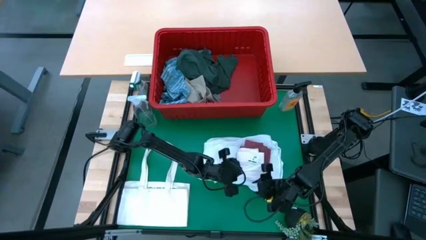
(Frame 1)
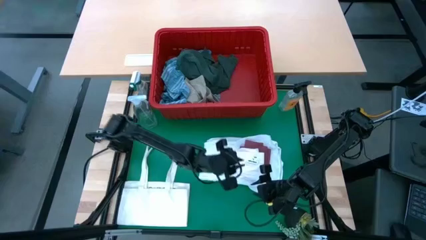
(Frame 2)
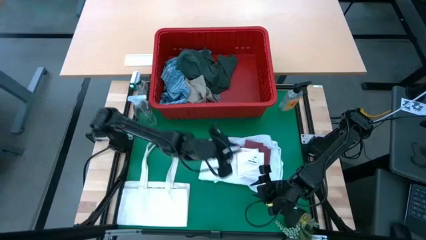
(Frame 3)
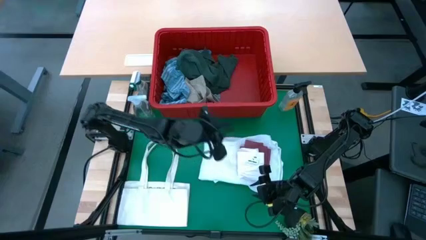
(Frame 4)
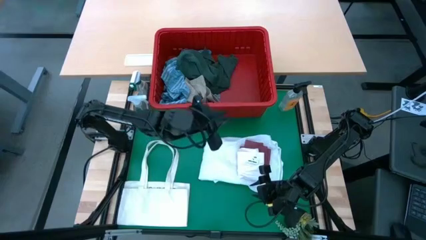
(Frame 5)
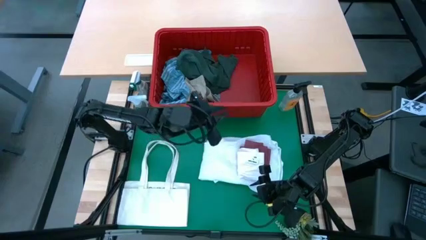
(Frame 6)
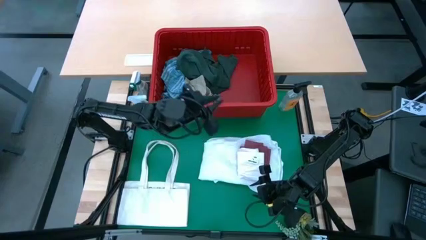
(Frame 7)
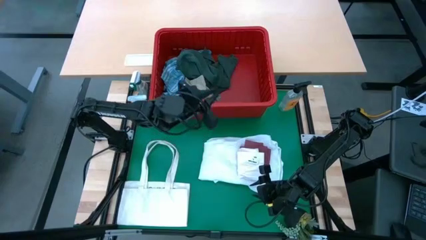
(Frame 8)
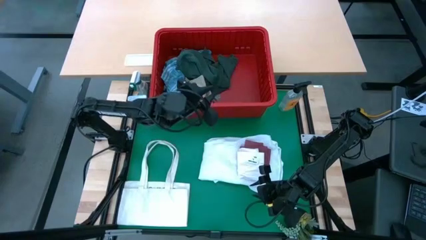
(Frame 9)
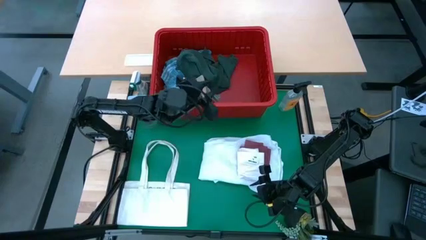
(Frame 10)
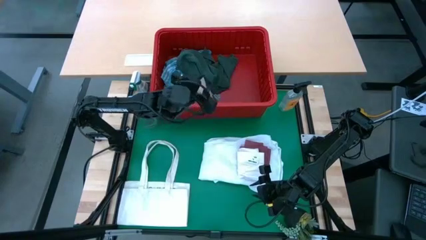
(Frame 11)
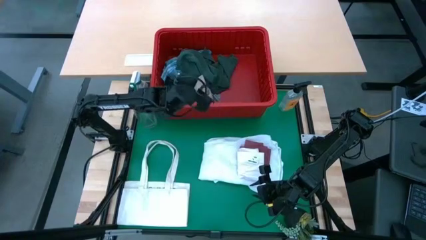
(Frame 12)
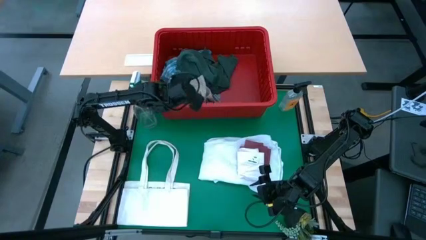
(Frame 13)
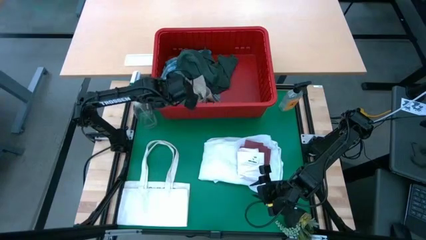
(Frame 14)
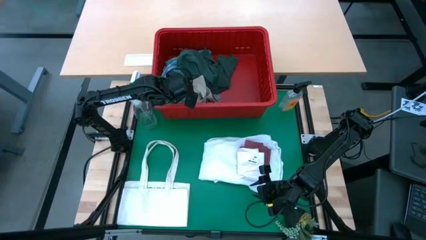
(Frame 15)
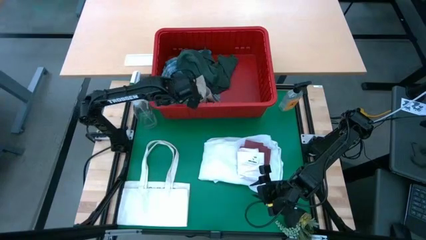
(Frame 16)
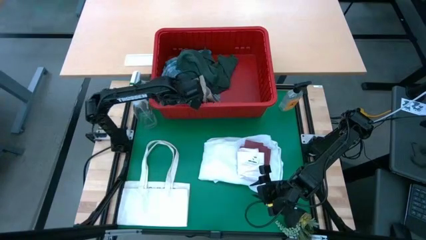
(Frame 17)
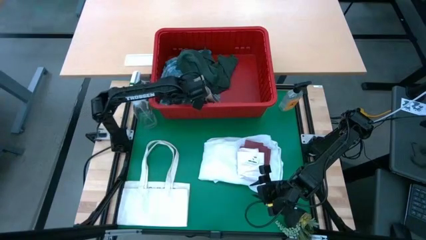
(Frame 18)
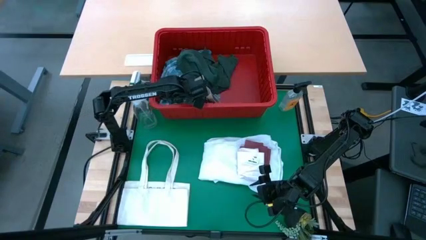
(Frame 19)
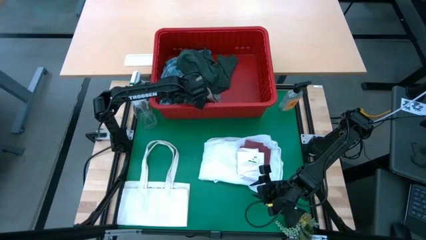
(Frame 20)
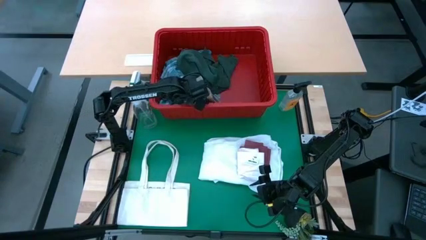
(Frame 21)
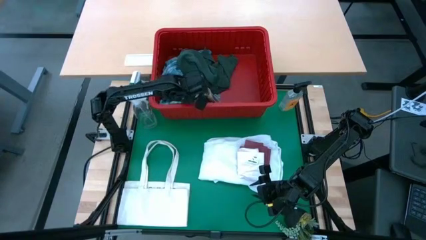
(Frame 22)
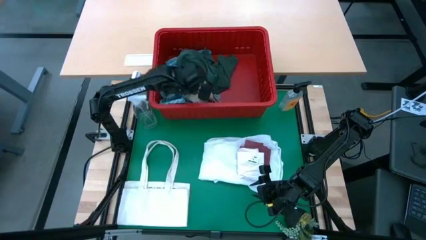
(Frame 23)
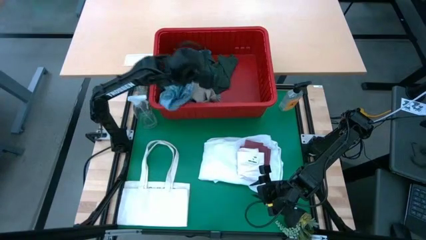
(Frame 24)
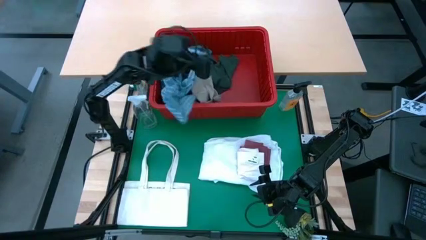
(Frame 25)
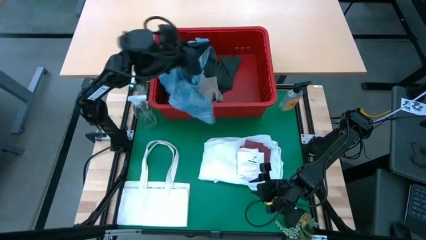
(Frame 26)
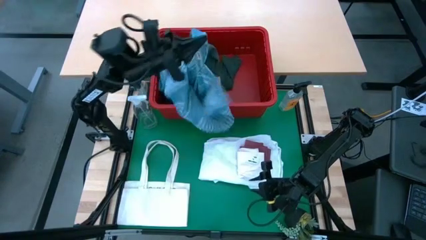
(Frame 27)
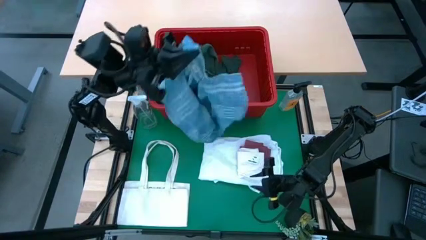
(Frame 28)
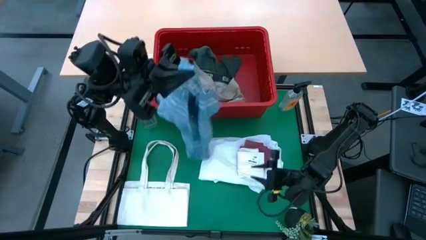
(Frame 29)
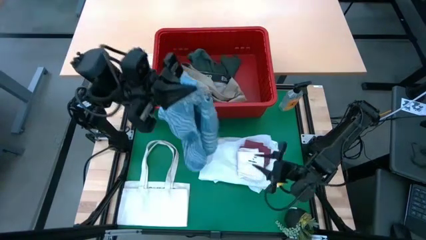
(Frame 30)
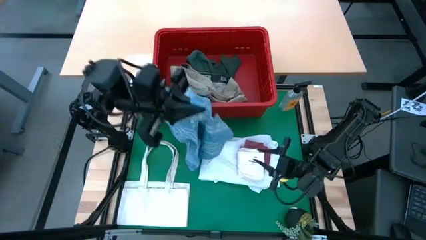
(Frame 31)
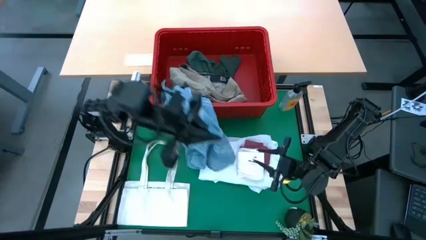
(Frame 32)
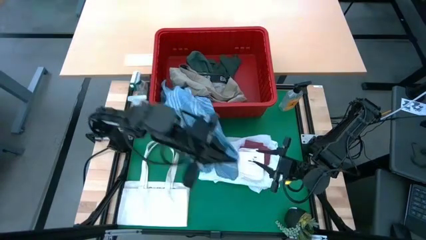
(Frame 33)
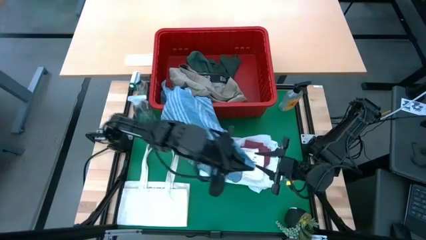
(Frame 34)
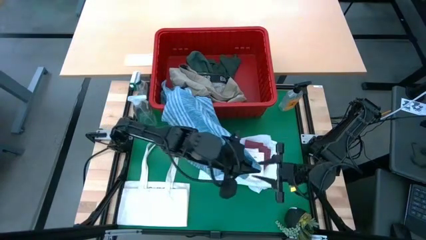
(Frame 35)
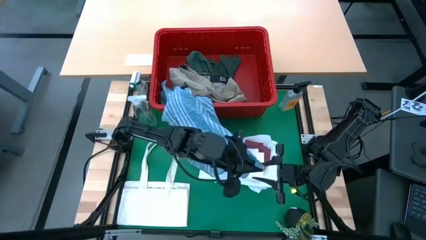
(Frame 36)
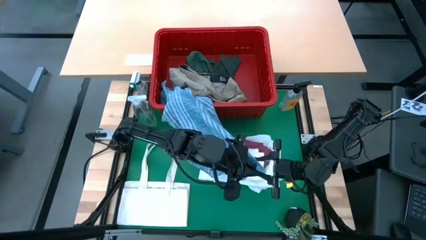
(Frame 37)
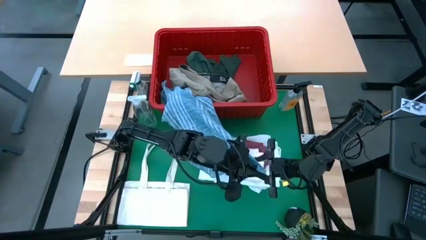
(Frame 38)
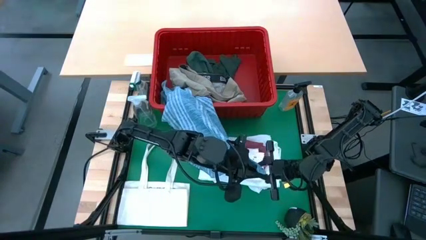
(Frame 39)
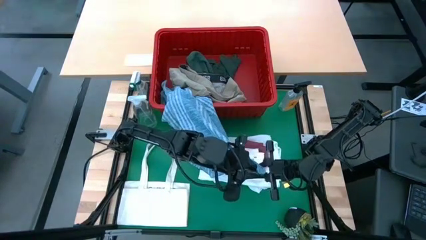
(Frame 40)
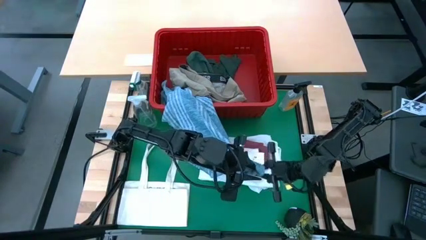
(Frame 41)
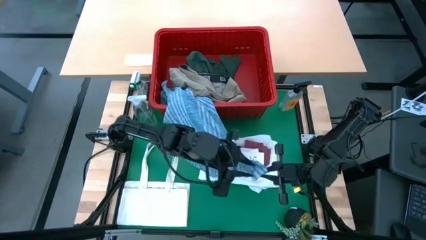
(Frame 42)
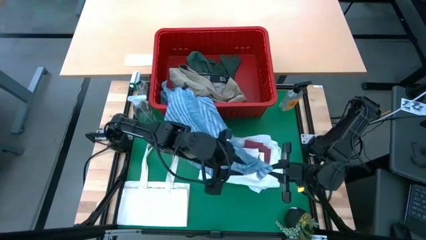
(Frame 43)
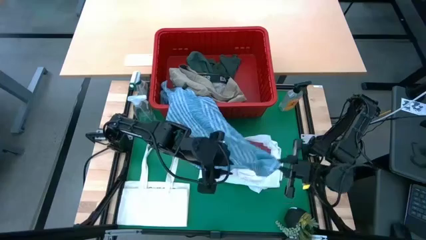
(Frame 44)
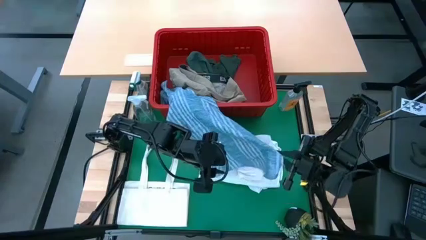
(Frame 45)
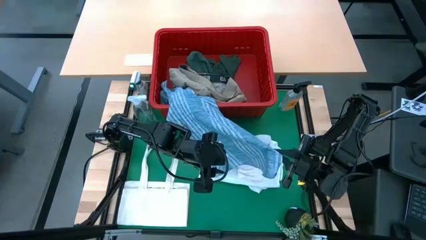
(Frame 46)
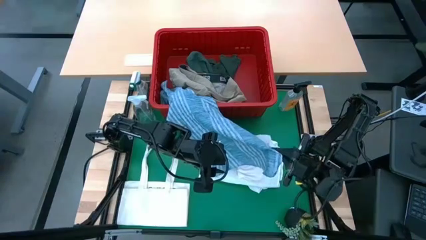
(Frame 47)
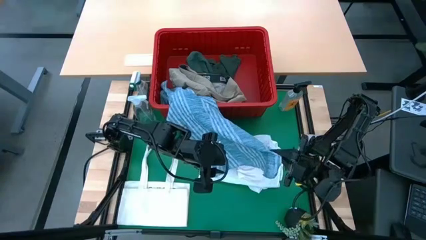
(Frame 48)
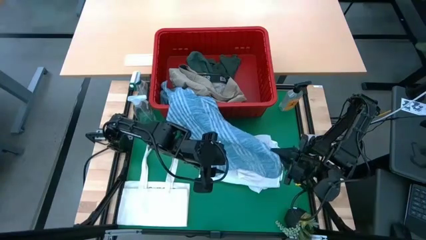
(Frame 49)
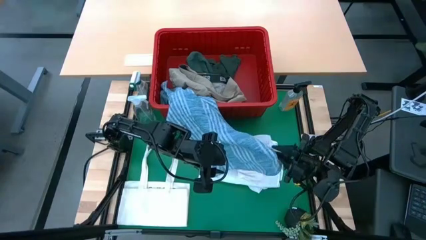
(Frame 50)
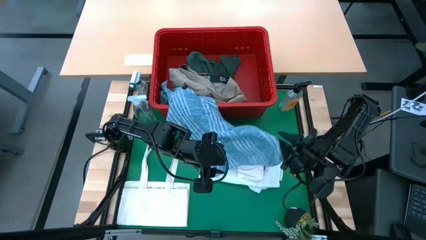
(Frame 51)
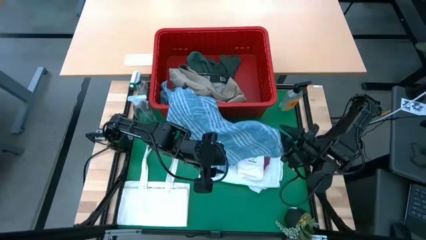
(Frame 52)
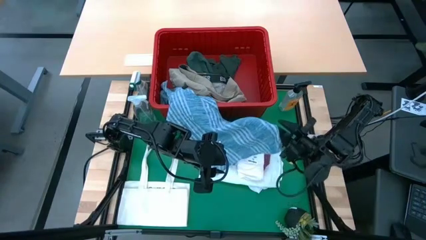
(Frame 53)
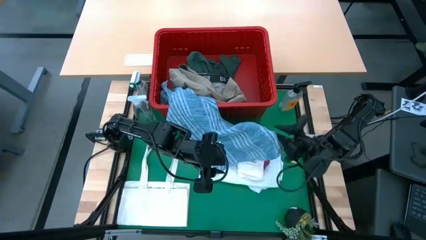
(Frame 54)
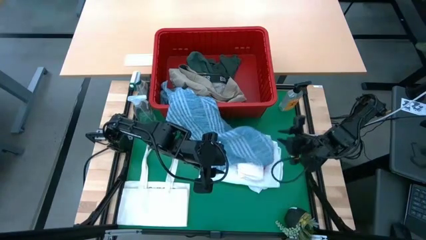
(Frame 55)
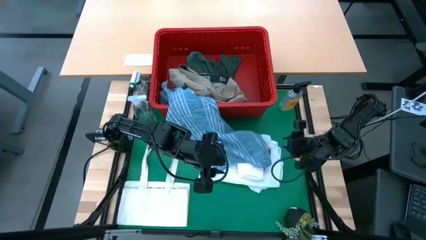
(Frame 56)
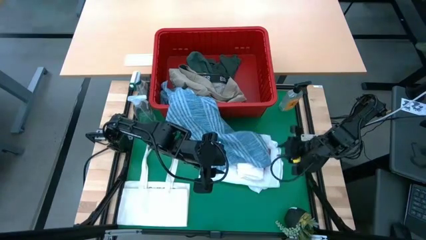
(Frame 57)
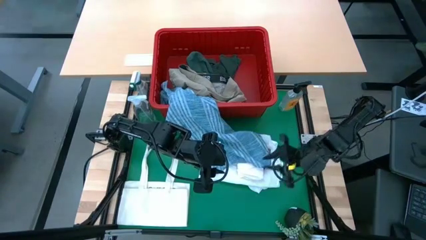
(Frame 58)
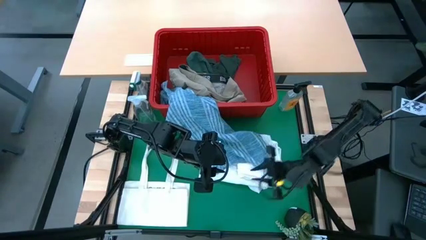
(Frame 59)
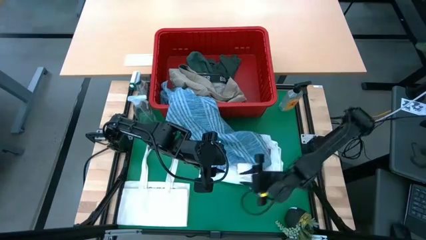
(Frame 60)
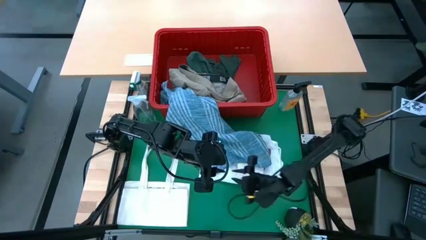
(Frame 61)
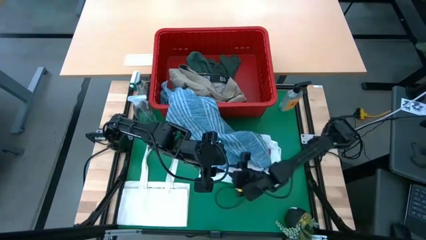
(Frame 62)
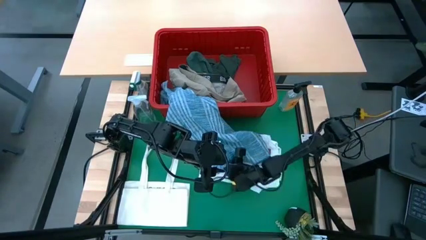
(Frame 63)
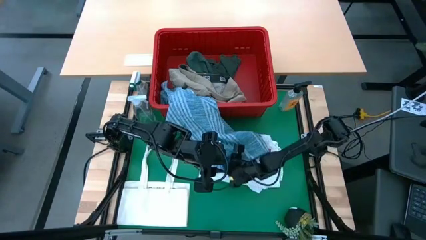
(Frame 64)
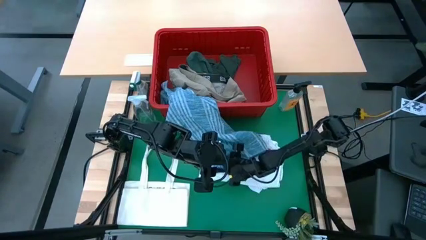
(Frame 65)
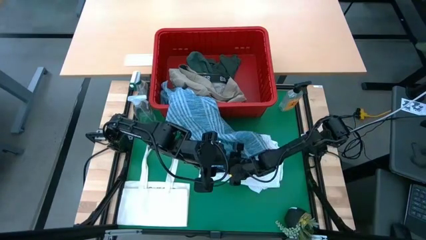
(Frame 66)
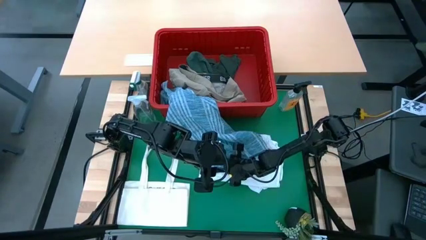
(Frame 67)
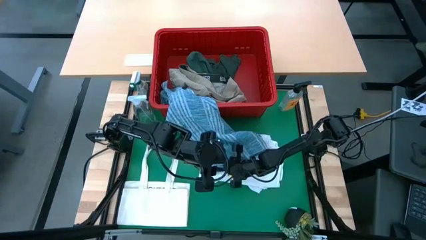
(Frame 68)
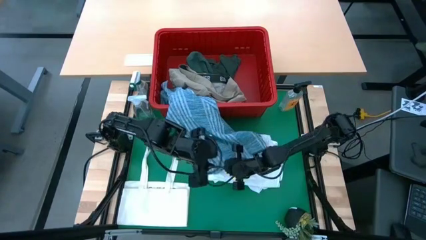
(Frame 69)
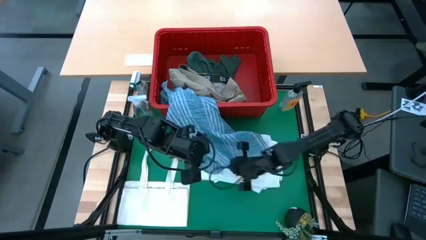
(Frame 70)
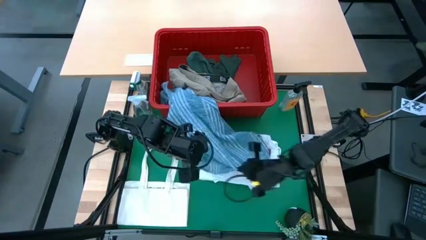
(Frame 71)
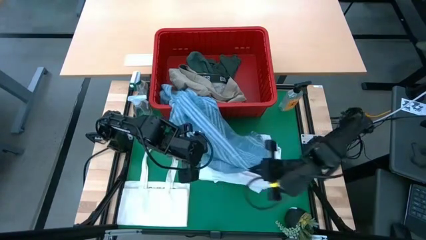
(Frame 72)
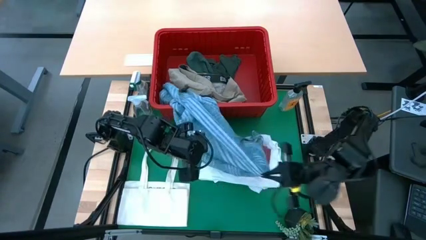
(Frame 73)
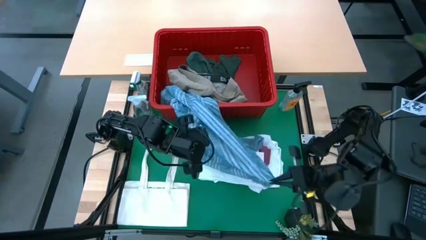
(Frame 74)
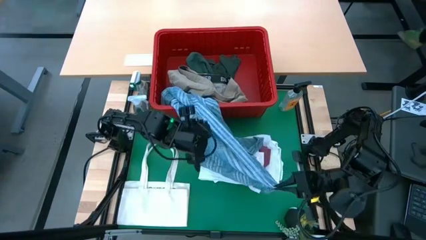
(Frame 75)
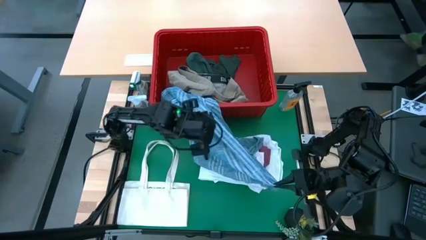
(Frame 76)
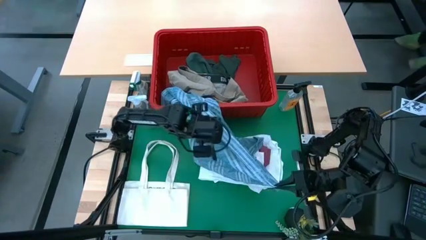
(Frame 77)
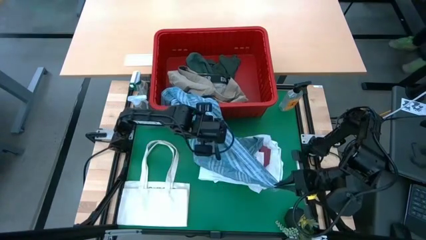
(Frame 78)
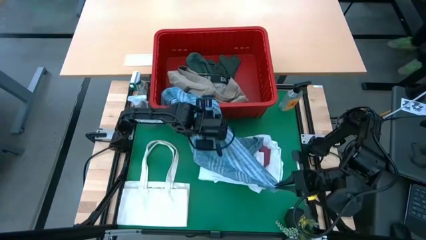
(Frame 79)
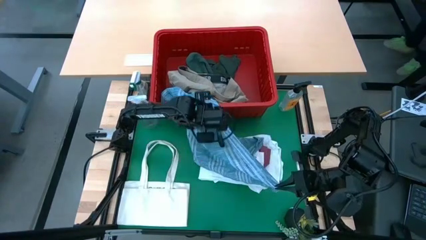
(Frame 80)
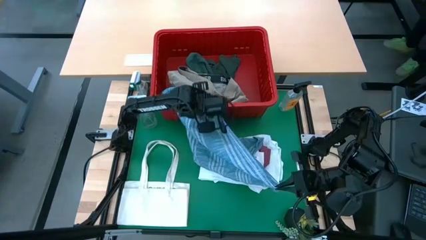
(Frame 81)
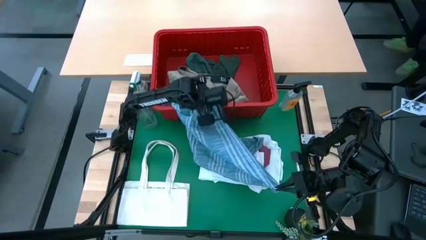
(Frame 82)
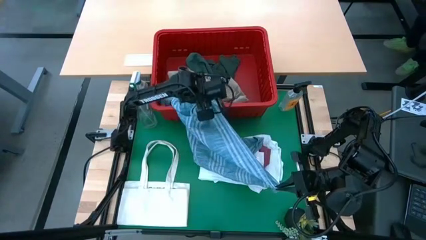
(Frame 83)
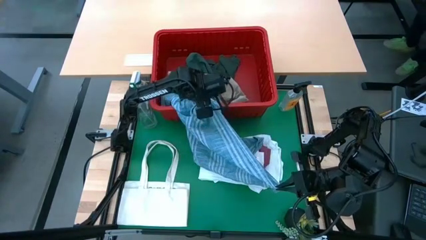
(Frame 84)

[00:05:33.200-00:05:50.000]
Task: Fold Laundry from Bin
Fold the blue checkered polo shirt
